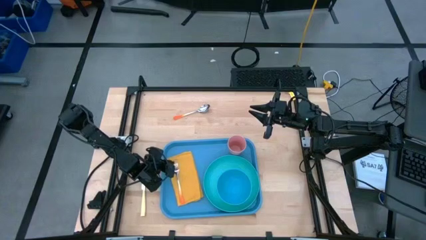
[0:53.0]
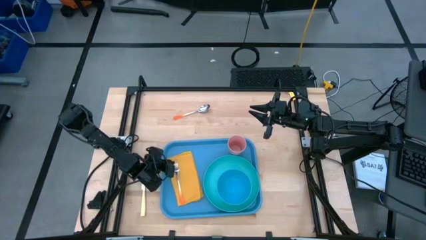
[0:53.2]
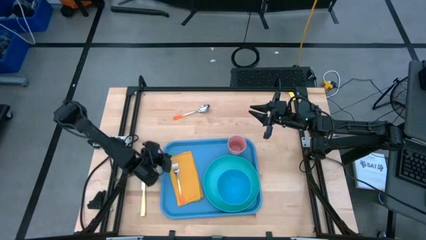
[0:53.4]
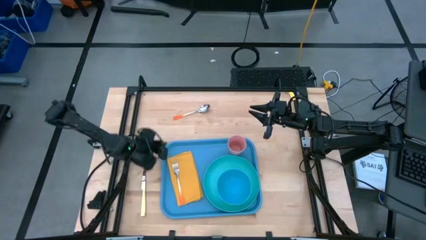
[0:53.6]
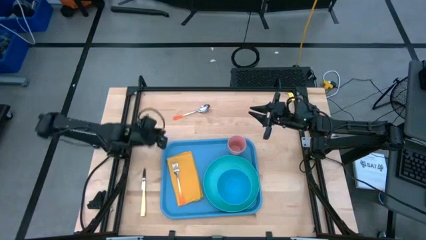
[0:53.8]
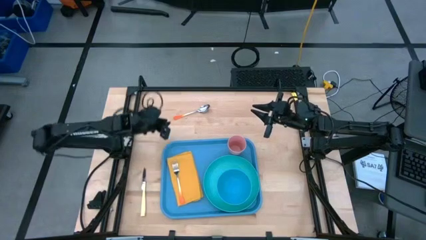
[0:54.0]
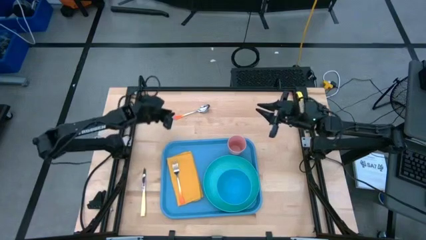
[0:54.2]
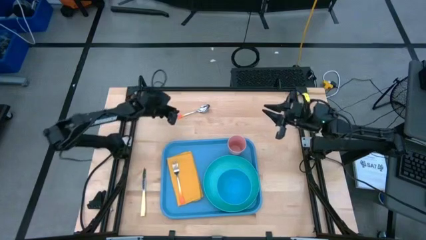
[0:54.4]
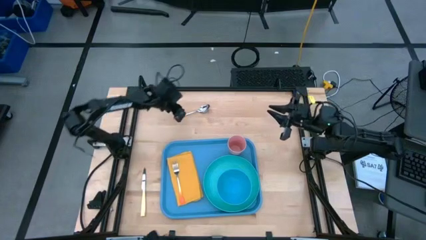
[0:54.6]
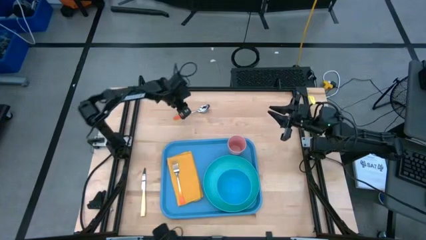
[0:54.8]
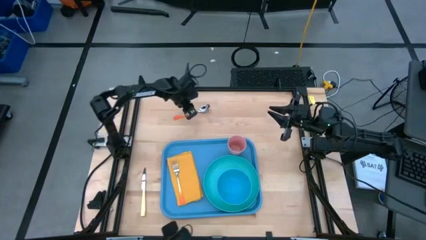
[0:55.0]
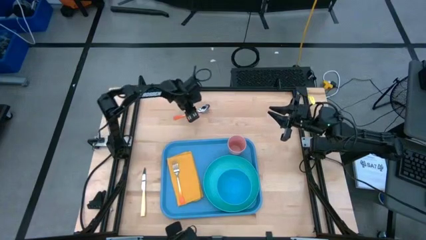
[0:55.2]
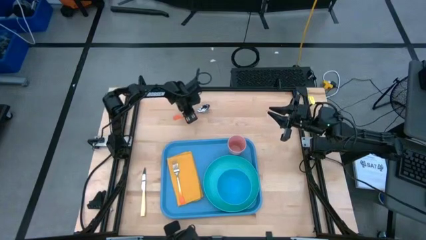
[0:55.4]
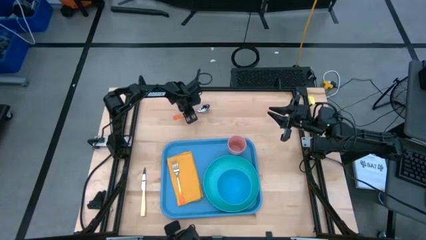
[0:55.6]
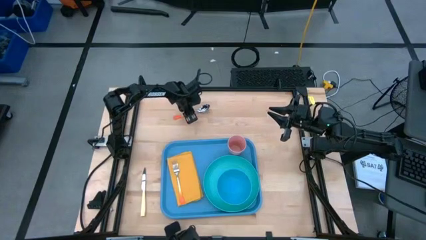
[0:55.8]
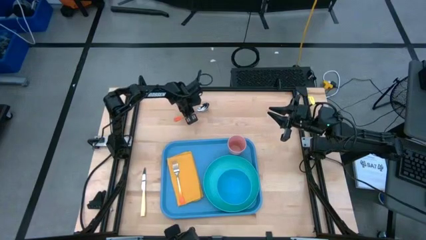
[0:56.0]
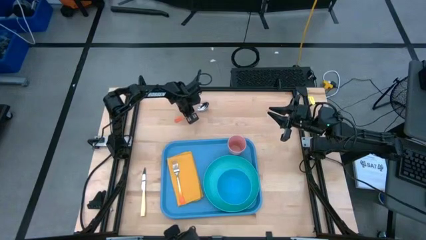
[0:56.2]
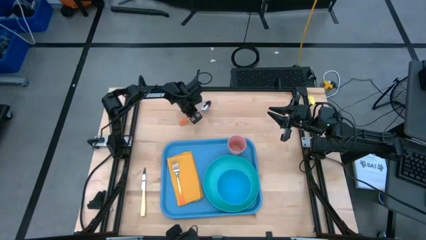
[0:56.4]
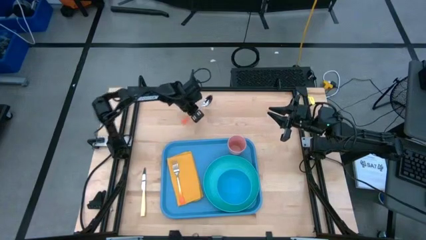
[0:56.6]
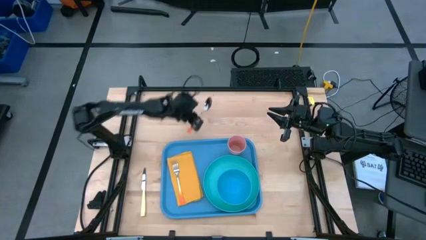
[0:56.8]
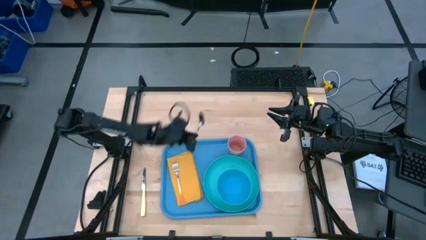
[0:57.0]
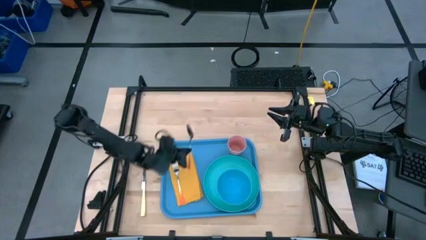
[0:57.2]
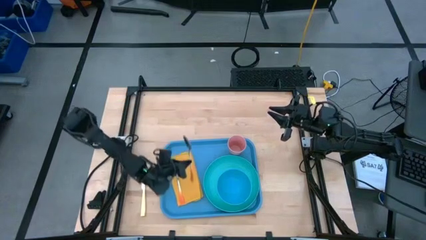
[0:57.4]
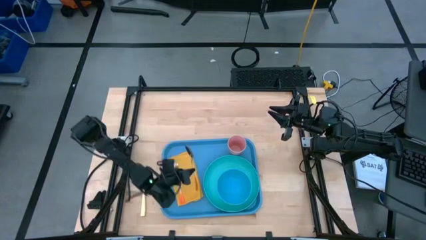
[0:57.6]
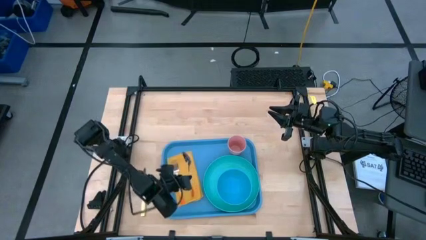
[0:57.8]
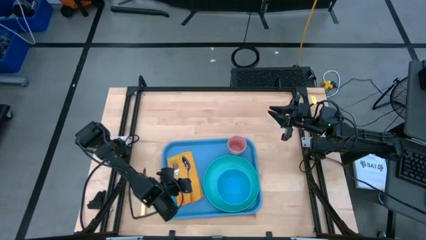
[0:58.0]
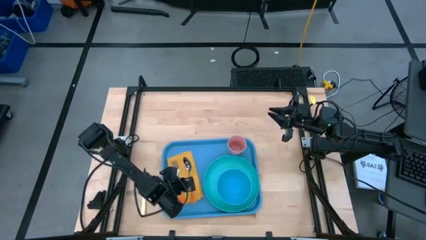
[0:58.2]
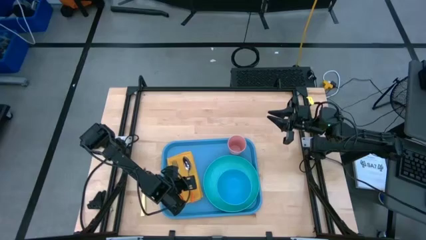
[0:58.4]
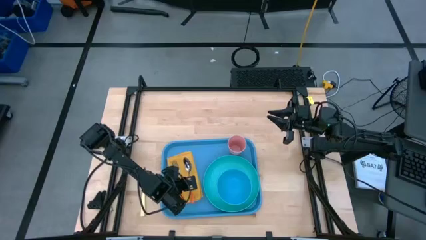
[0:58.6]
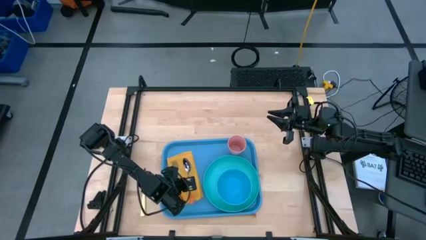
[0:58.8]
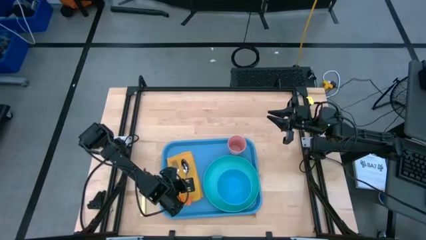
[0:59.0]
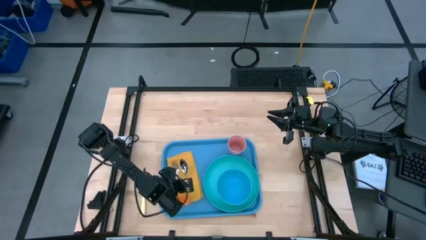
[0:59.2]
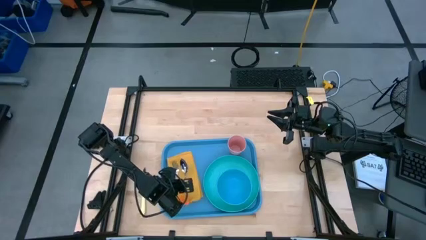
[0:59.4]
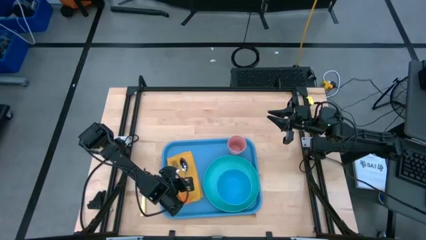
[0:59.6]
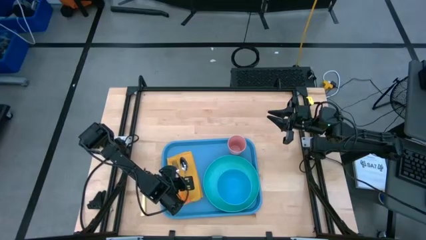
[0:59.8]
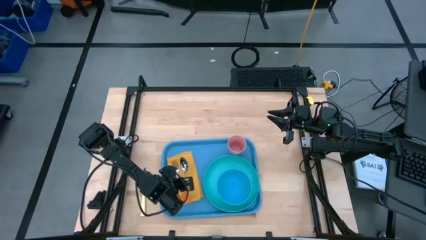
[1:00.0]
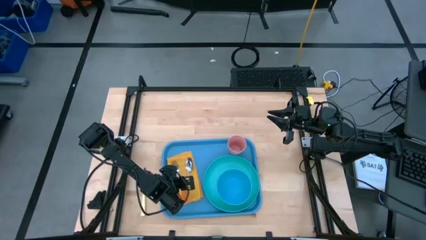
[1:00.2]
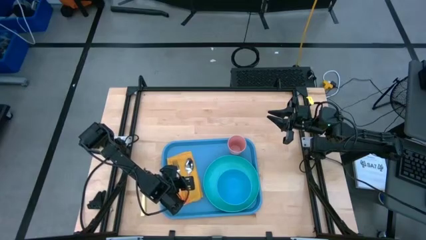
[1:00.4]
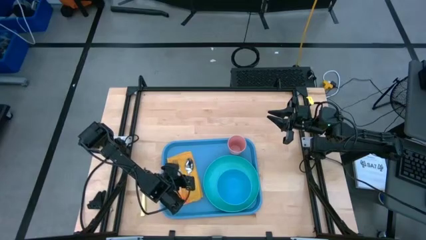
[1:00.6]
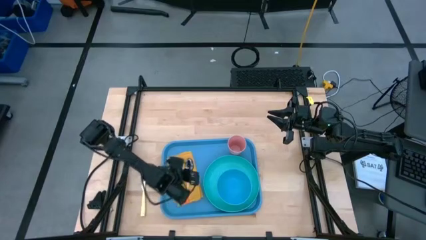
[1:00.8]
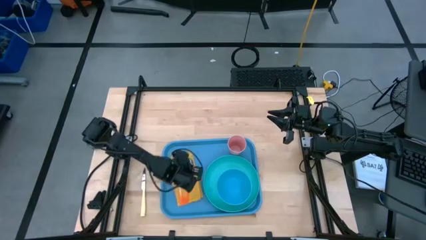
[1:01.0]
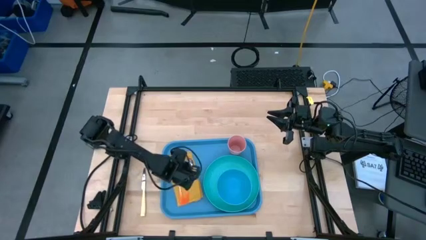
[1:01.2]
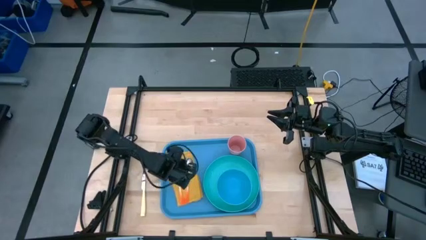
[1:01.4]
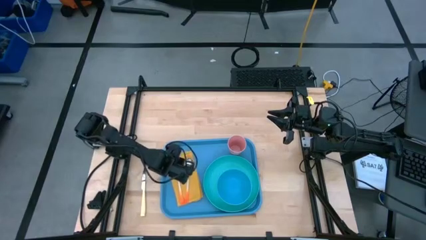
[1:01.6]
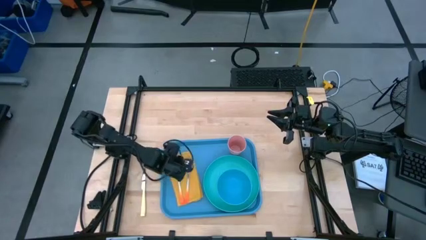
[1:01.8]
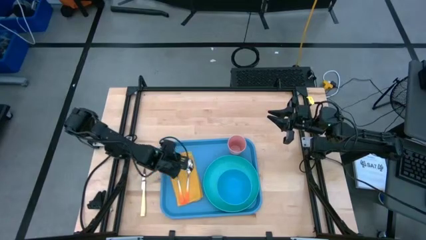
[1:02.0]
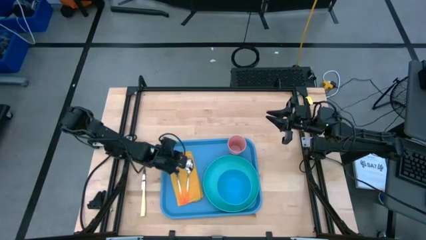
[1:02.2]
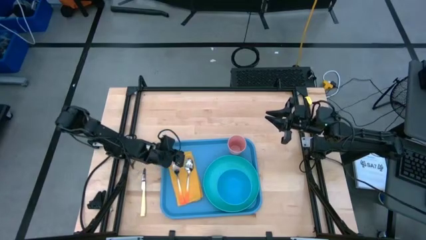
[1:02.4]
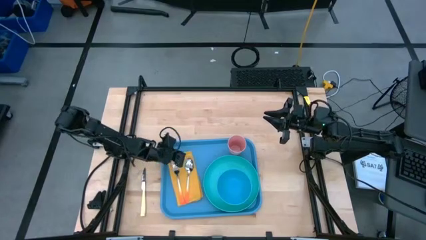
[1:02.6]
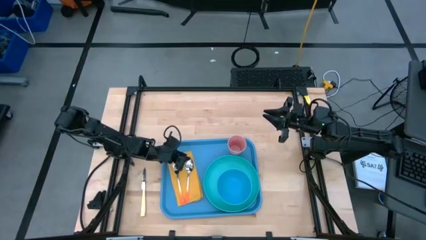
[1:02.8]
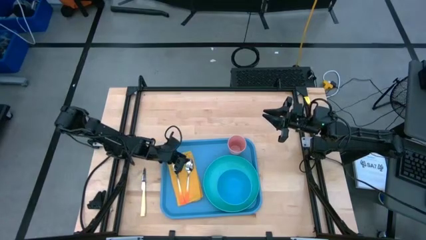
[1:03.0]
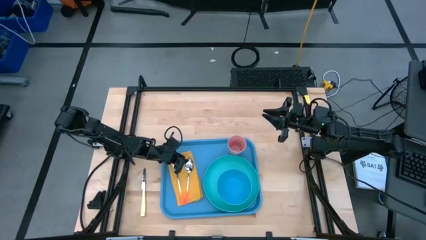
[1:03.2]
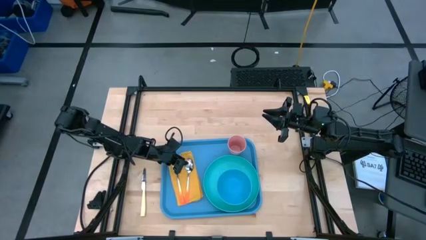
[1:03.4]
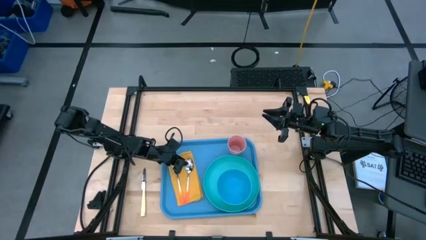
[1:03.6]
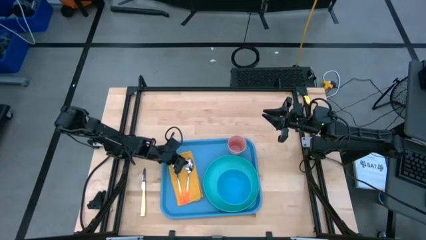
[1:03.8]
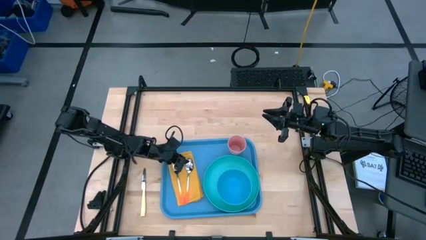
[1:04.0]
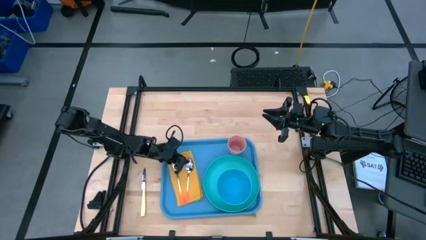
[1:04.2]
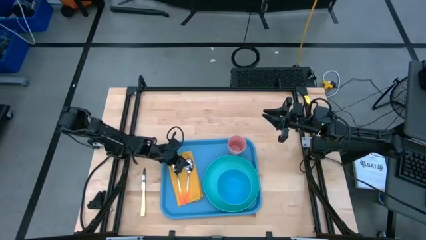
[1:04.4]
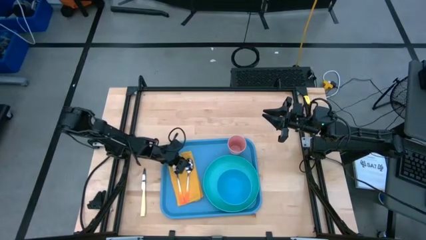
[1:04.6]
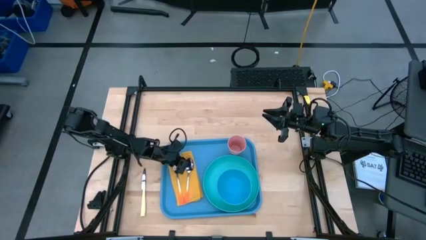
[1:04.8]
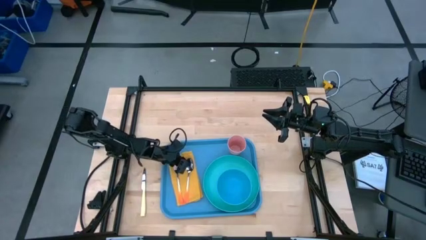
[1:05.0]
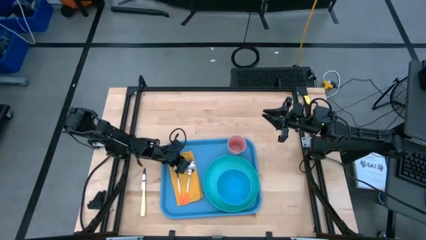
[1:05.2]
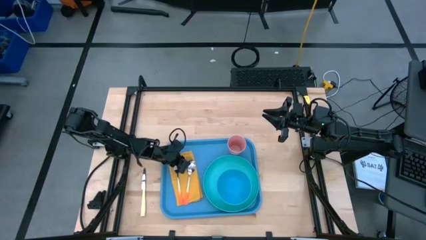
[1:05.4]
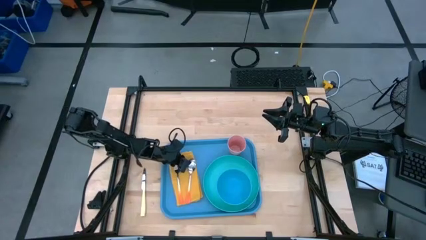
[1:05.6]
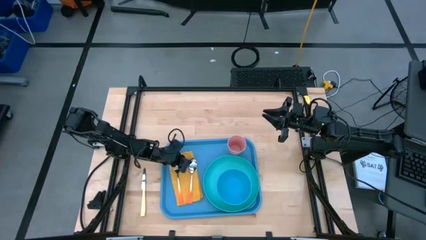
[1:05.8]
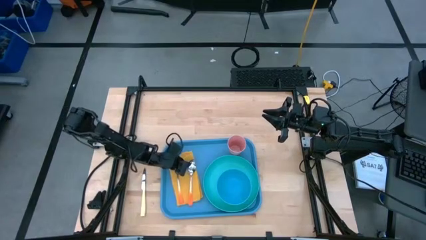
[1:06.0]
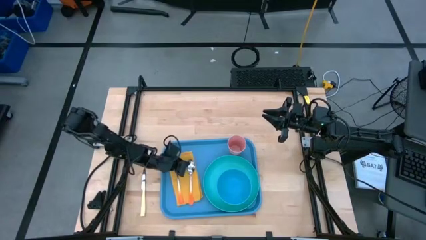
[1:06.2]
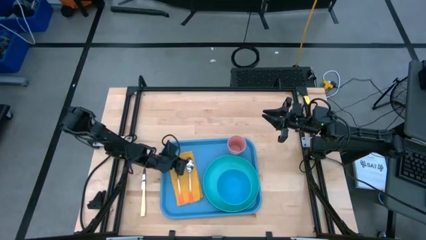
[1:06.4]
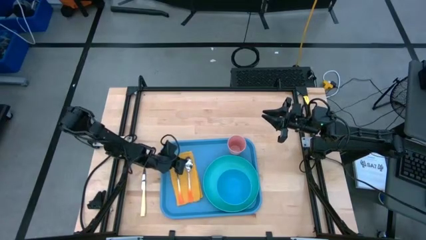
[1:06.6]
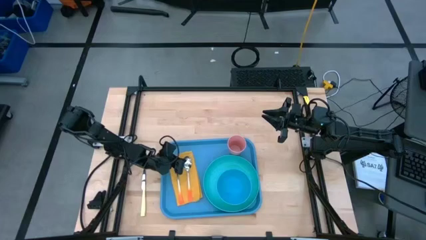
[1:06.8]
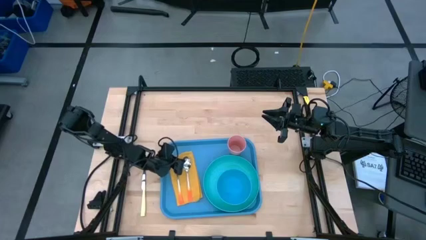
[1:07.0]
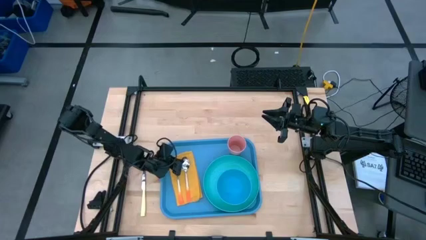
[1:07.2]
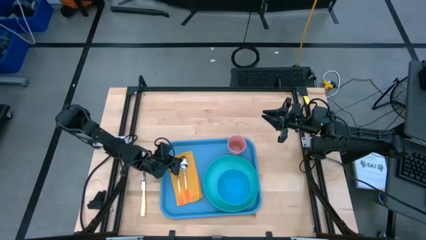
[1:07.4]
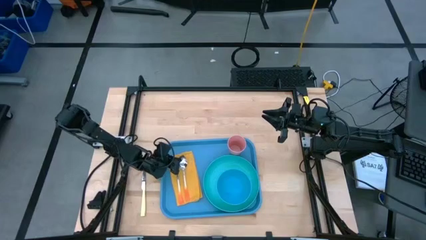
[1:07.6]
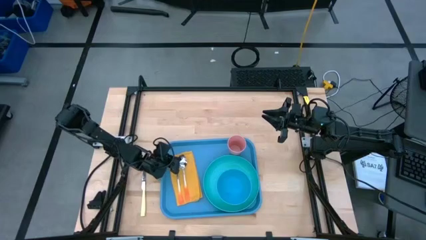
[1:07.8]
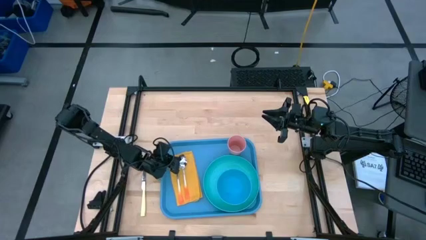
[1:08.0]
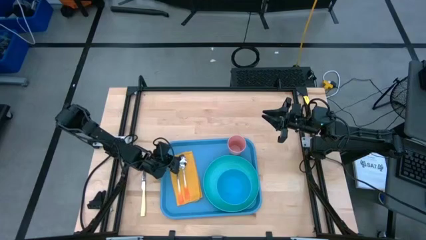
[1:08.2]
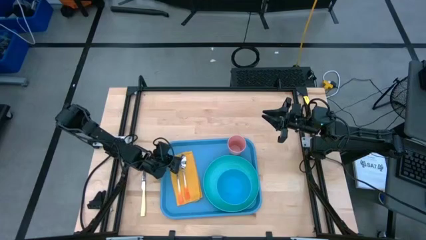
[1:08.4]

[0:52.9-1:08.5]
Task: Set up tray
Put the orange spoon on the yellow napkin
